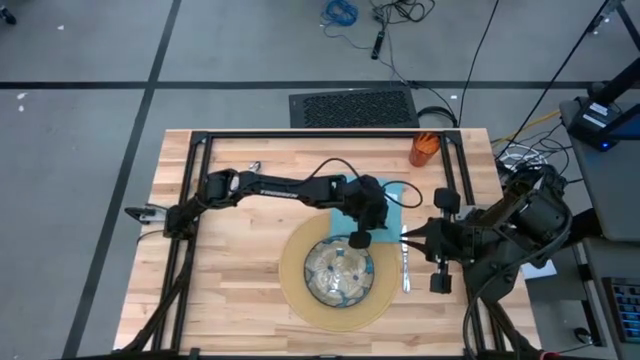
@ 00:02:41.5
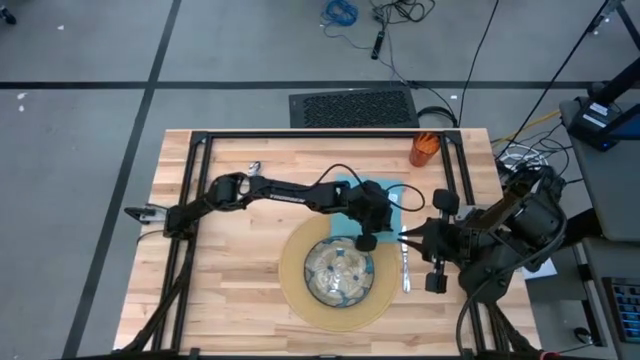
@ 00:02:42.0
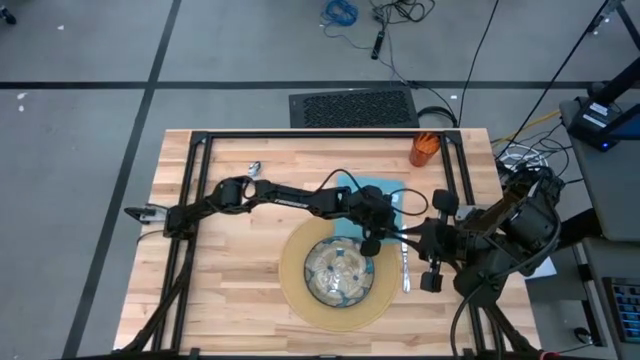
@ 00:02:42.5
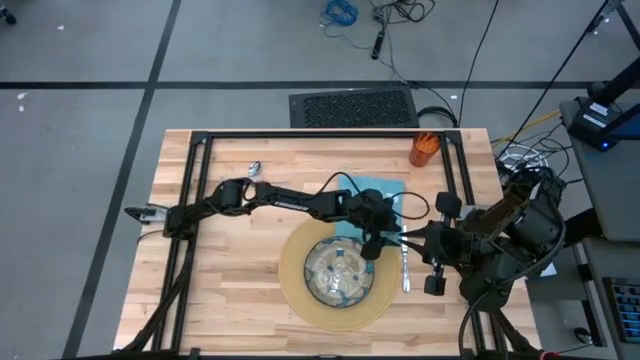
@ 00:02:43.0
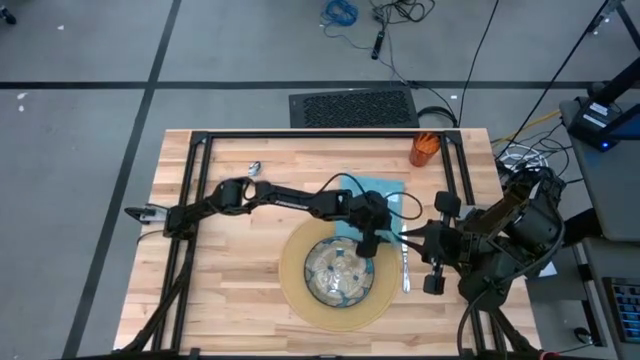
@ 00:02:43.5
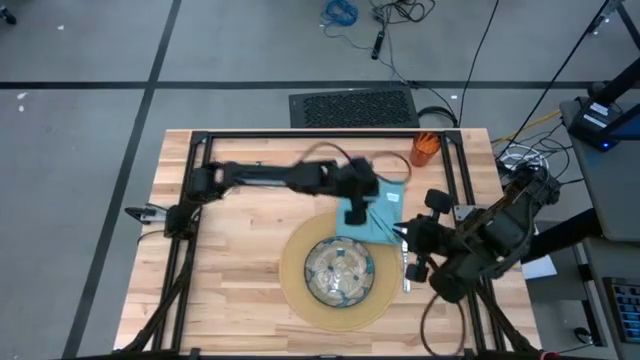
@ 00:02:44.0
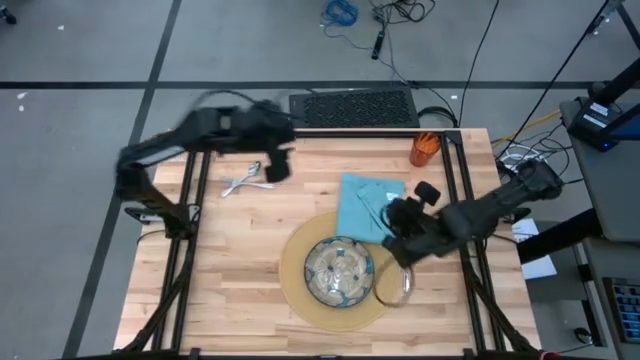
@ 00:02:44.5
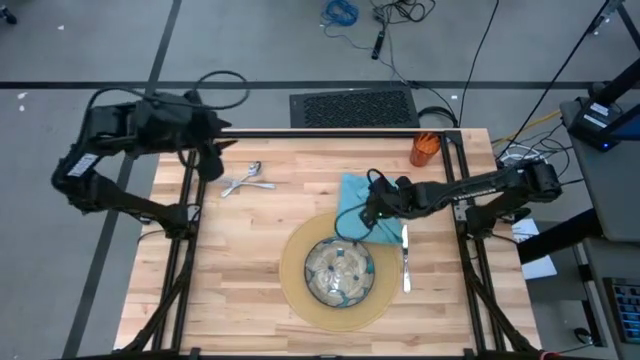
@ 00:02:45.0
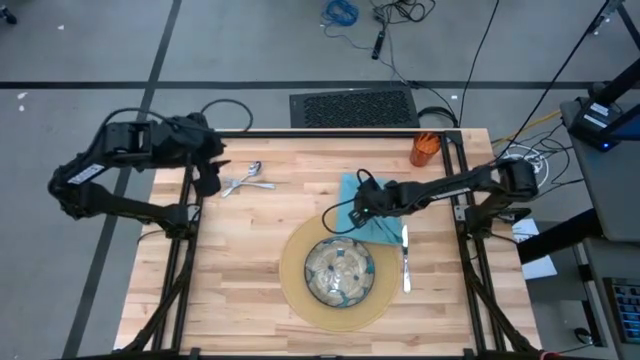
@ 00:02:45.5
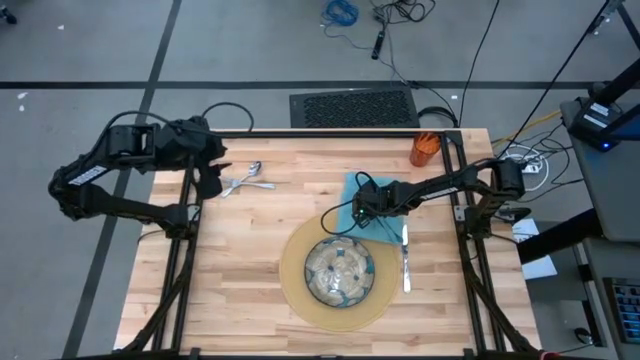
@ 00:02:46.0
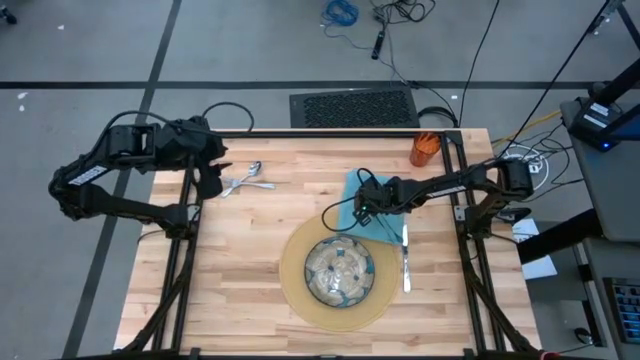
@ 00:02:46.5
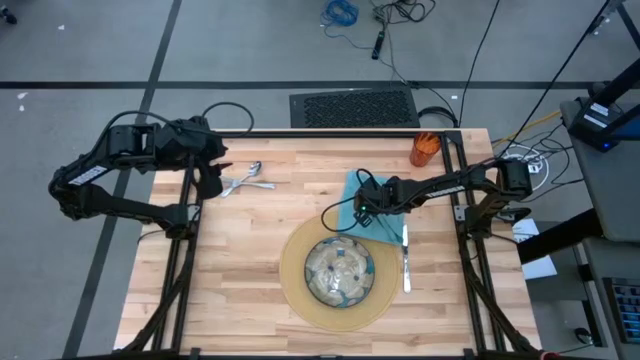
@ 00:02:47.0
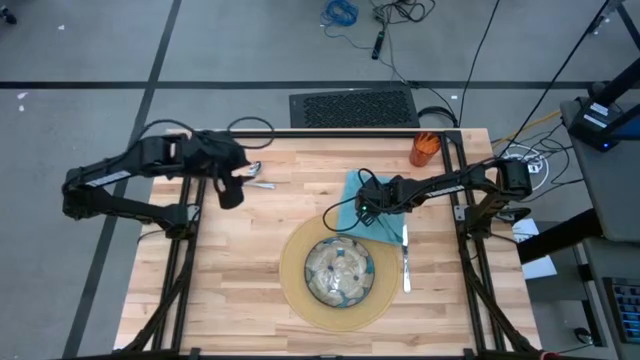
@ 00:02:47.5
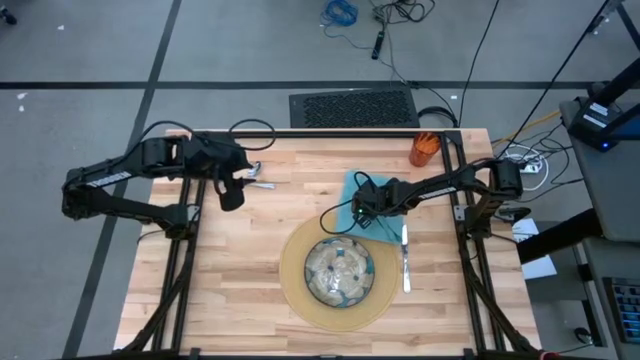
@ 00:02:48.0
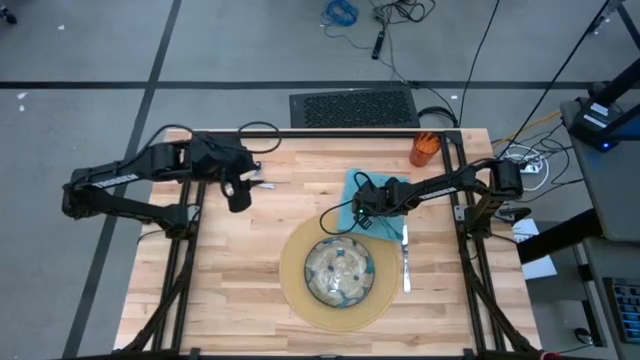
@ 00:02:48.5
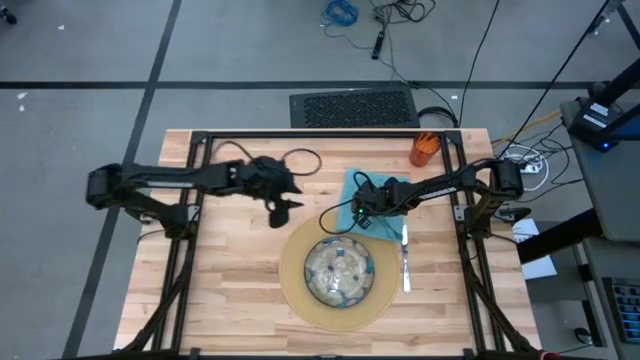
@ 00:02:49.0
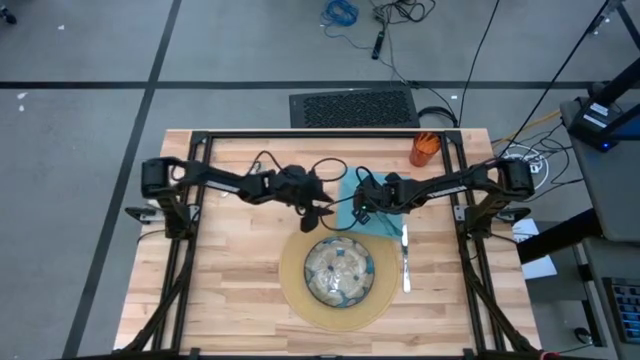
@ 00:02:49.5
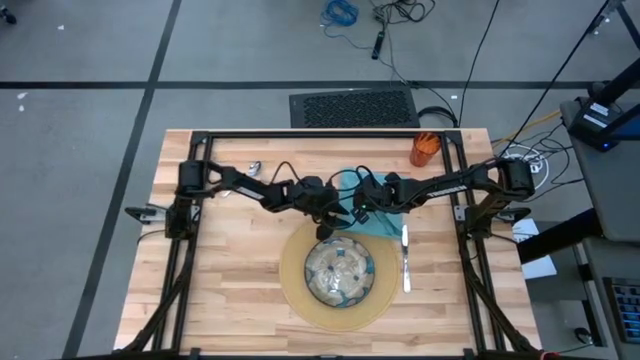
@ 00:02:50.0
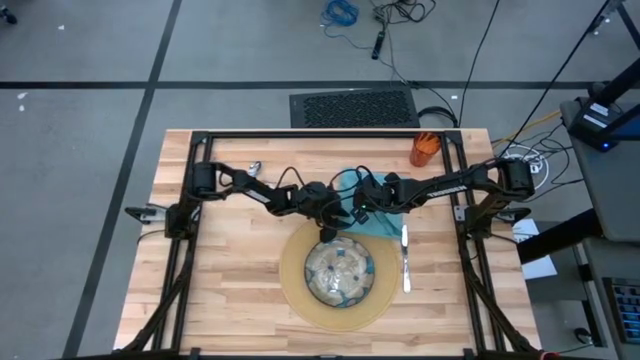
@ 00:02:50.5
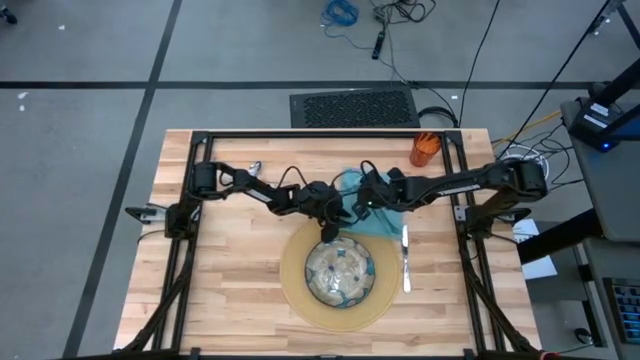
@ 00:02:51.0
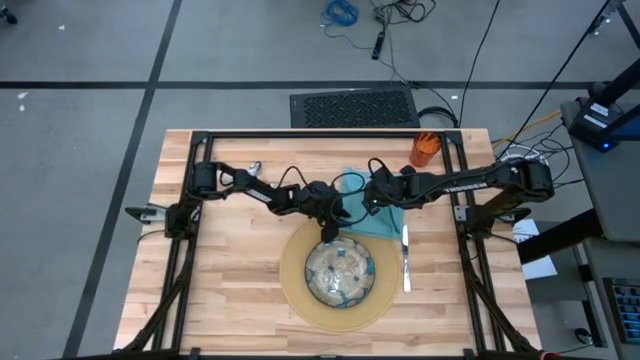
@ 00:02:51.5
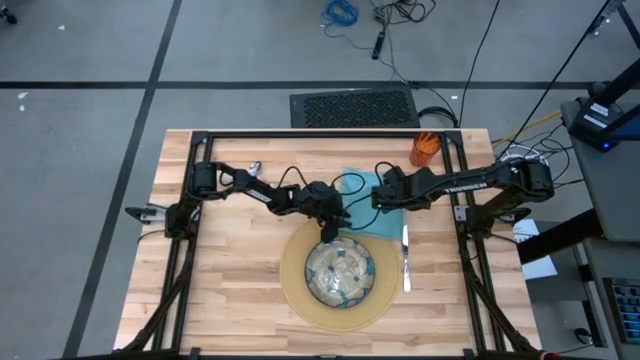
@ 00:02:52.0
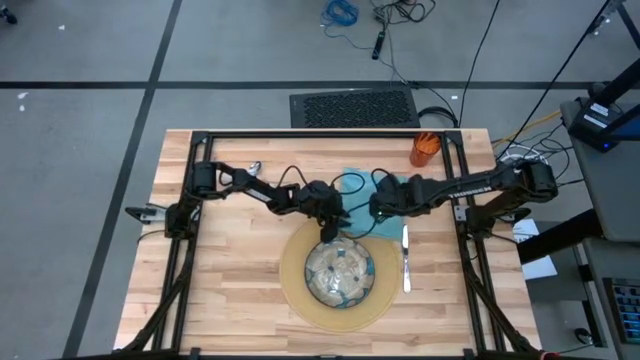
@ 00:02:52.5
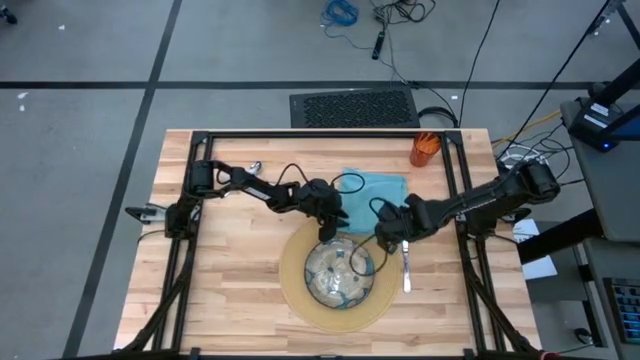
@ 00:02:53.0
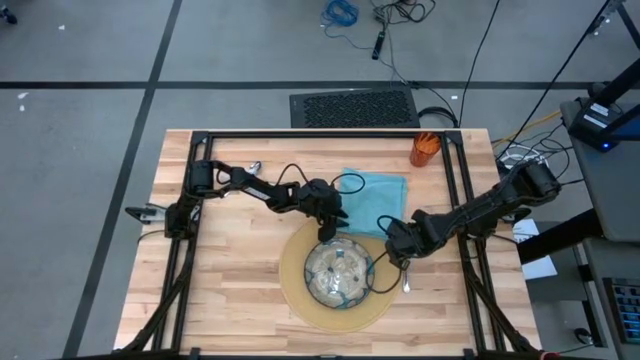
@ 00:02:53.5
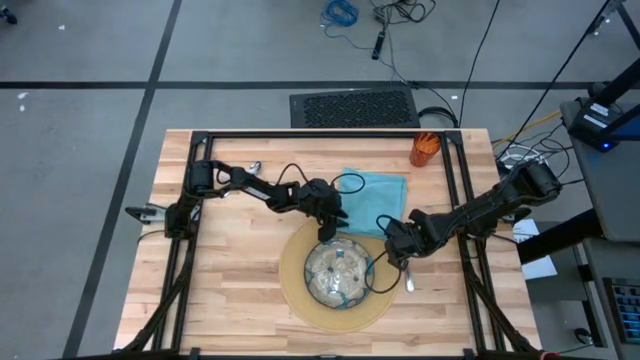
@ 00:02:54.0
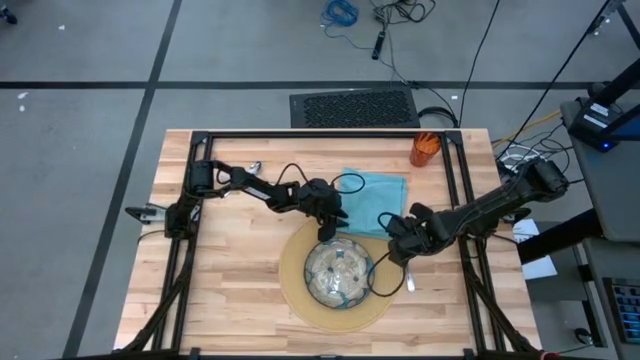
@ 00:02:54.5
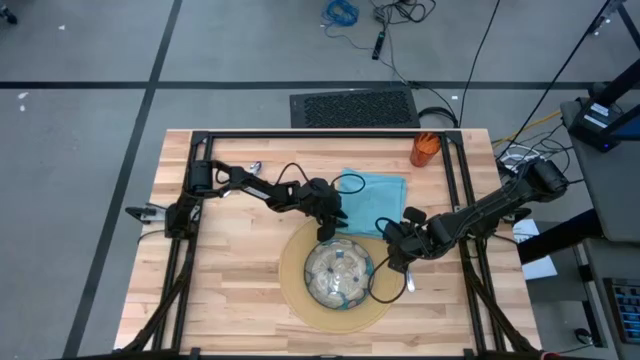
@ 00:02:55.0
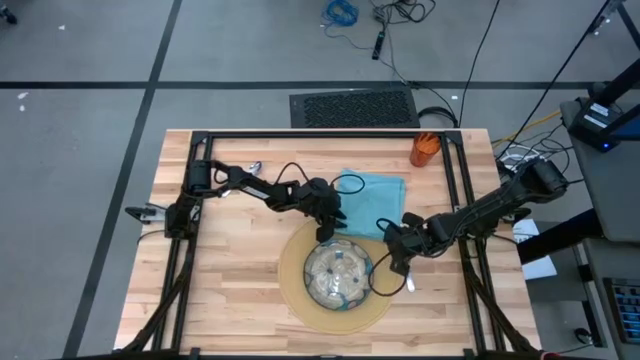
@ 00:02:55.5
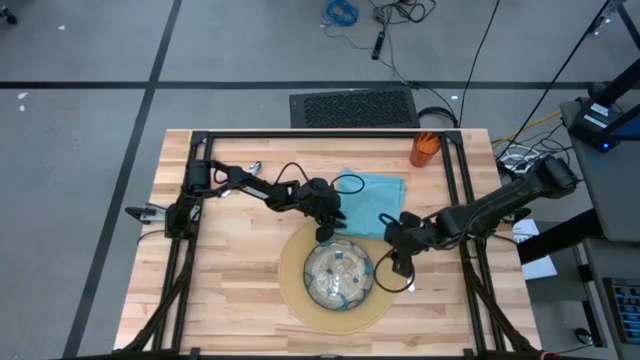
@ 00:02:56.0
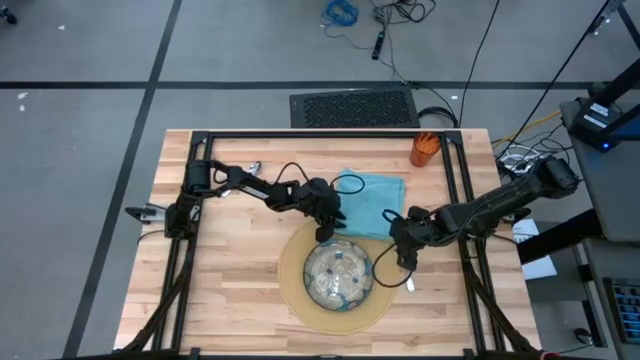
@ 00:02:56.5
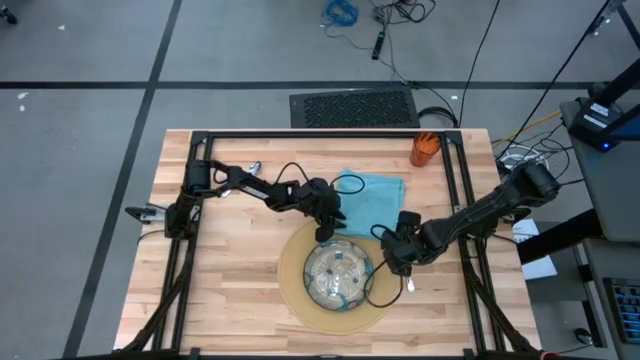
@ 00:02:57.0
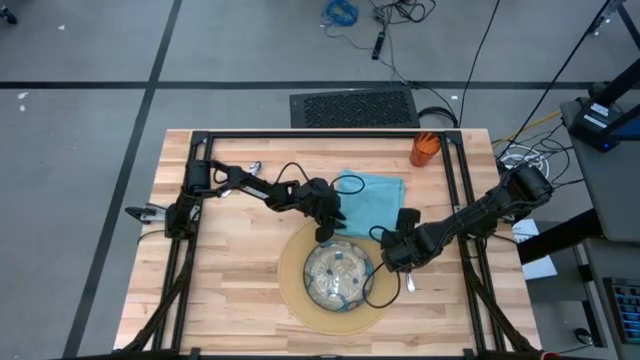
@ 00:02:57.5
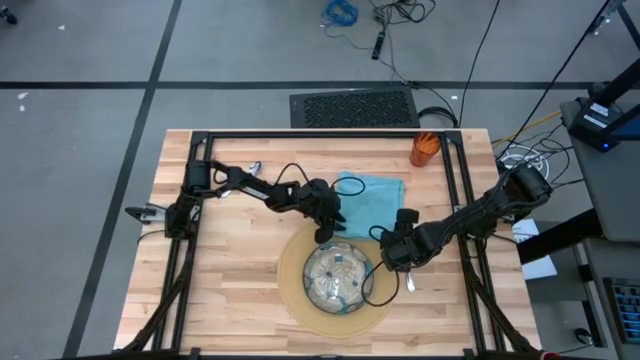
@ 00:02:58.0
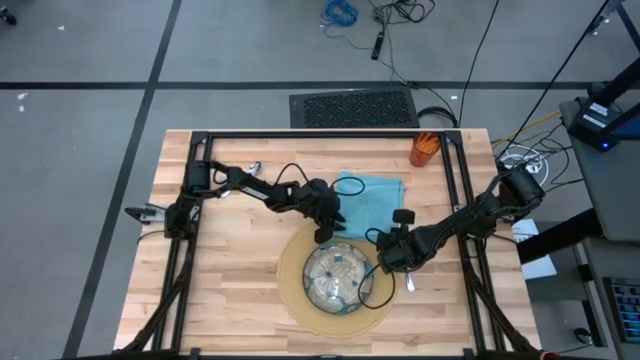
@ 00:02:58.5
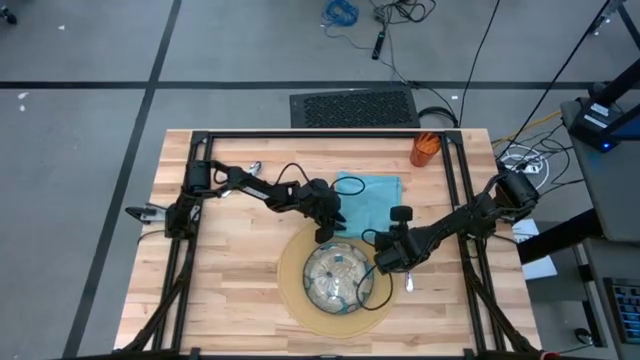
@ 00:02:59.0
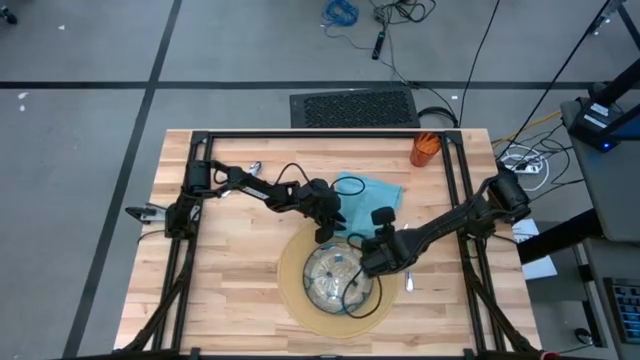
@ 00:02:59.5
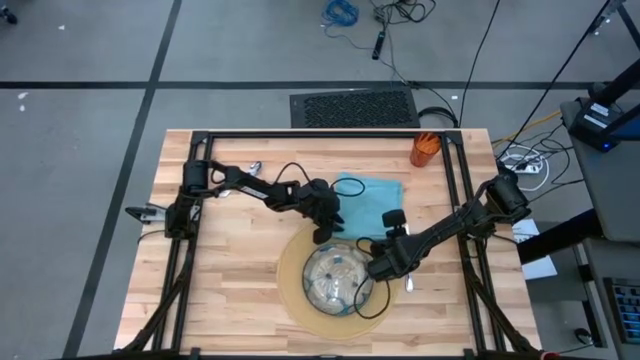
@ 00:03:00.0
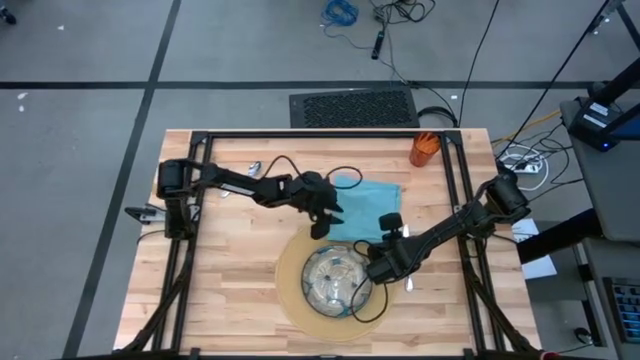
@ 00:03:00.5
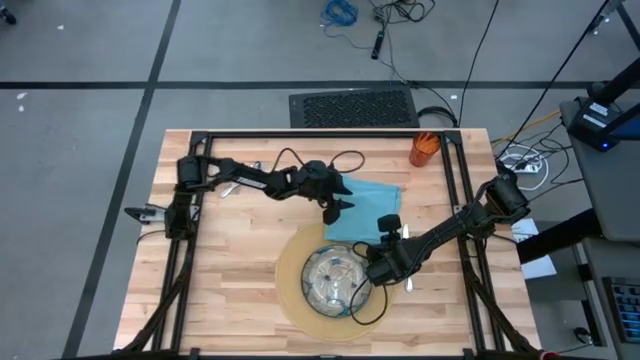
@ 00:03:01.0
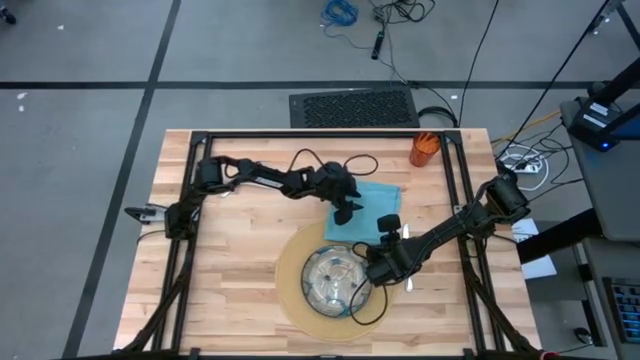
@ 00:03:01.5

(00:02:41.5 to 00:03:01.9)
Task: Set table place
Fold the blue napkin
